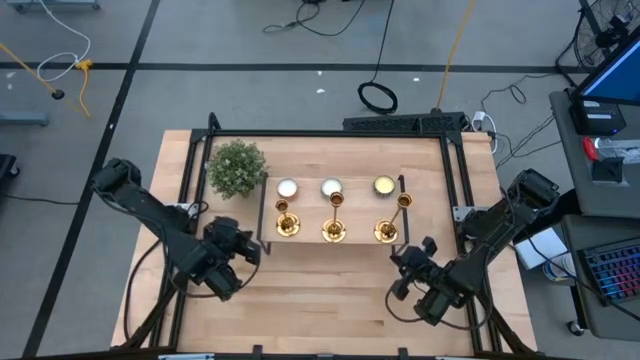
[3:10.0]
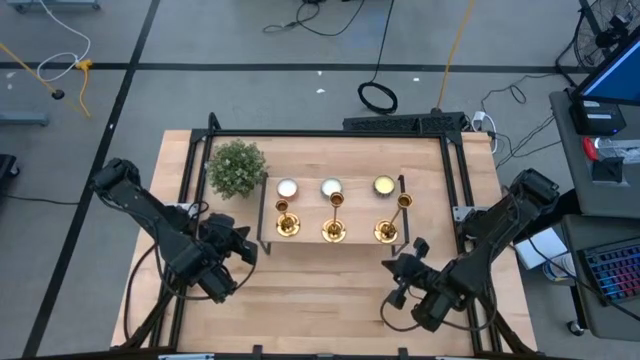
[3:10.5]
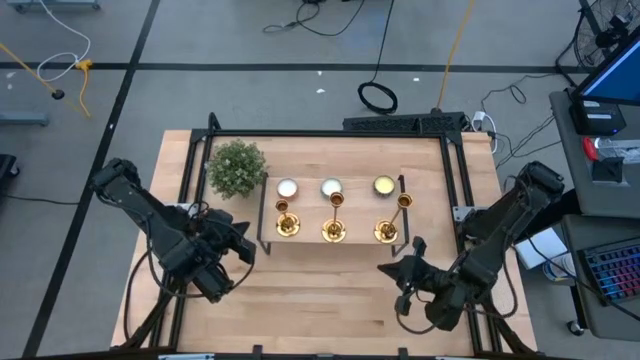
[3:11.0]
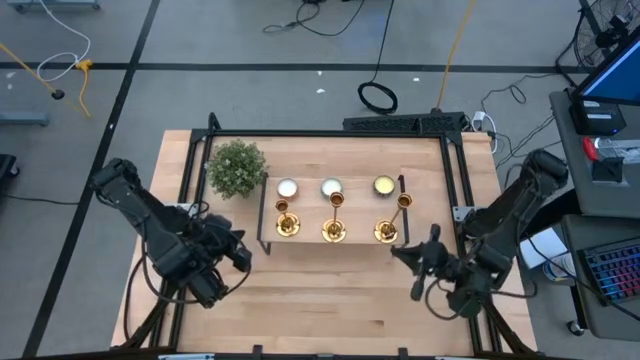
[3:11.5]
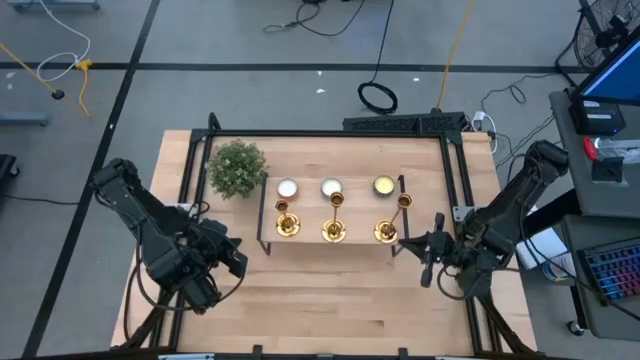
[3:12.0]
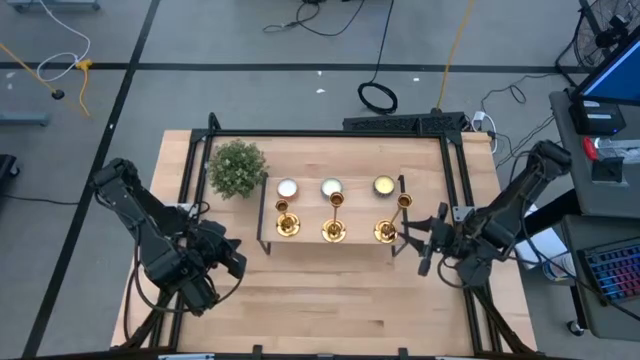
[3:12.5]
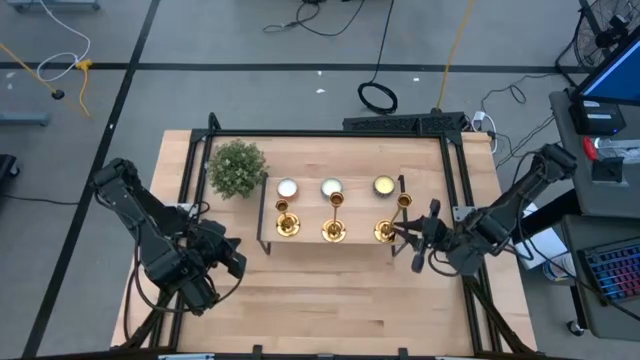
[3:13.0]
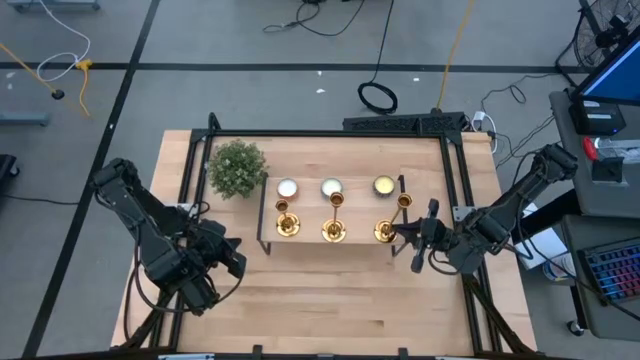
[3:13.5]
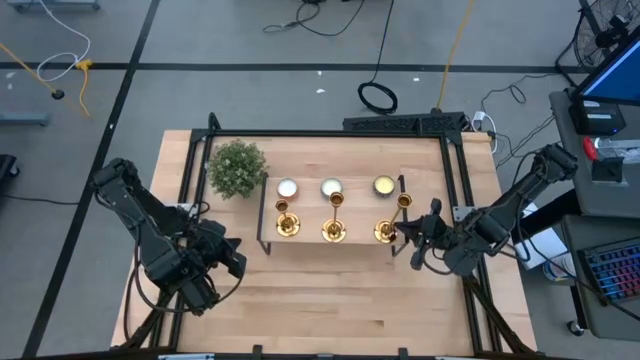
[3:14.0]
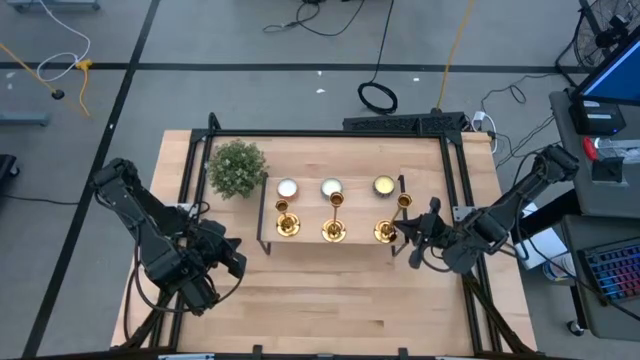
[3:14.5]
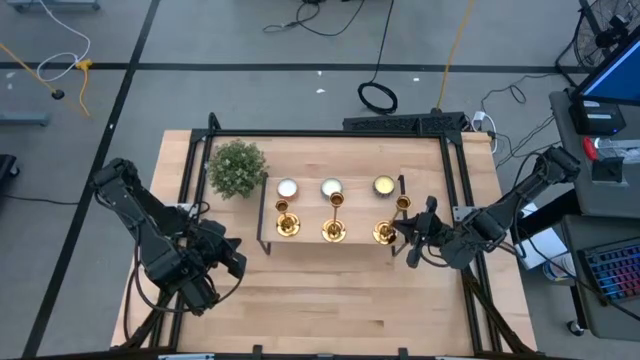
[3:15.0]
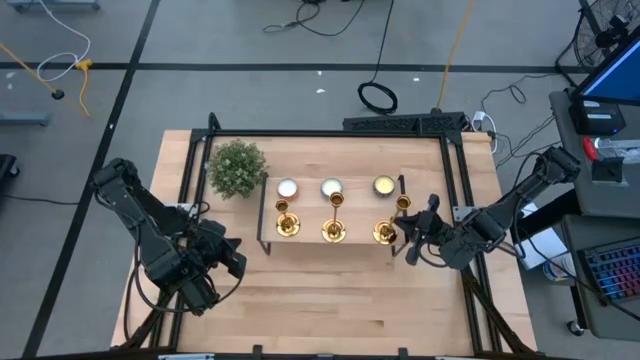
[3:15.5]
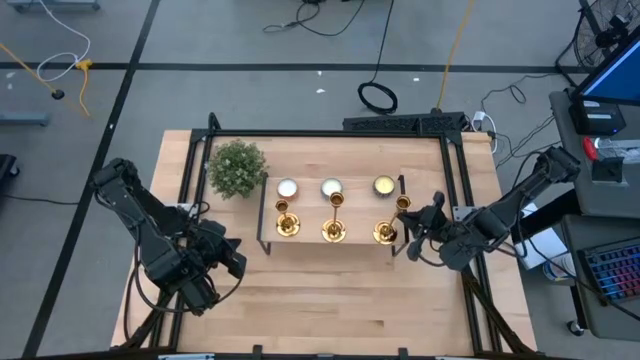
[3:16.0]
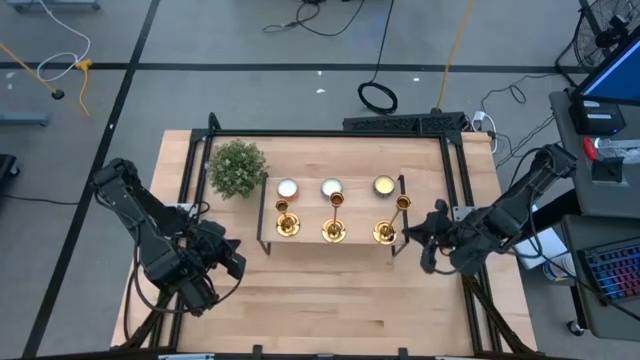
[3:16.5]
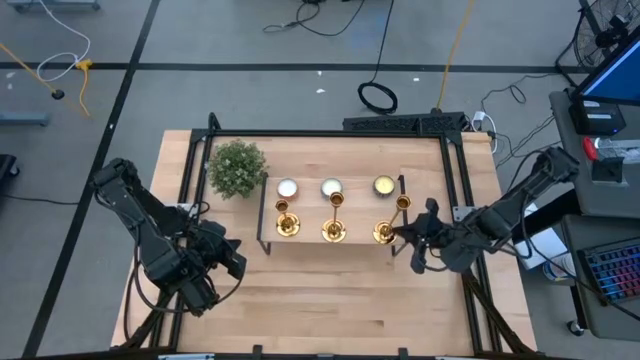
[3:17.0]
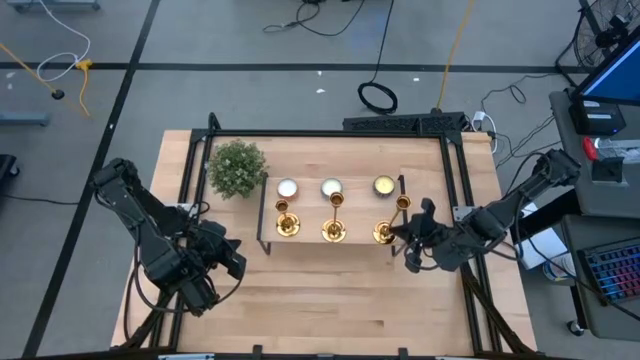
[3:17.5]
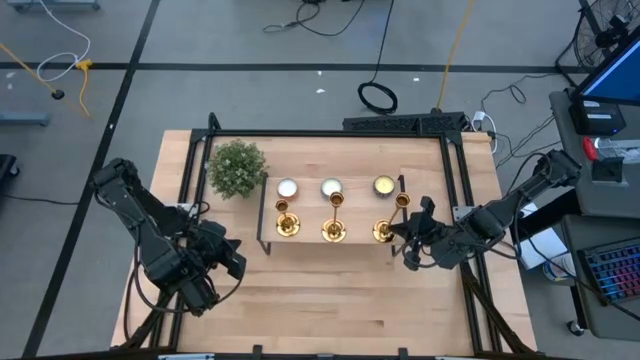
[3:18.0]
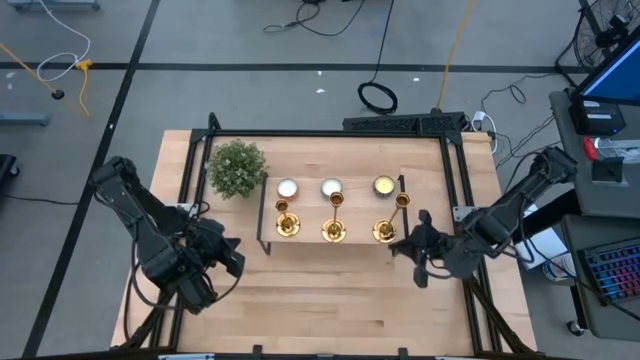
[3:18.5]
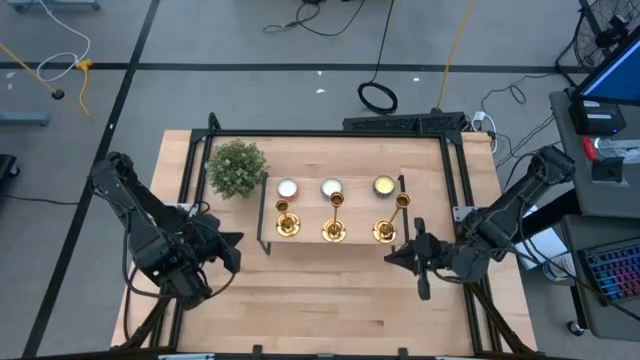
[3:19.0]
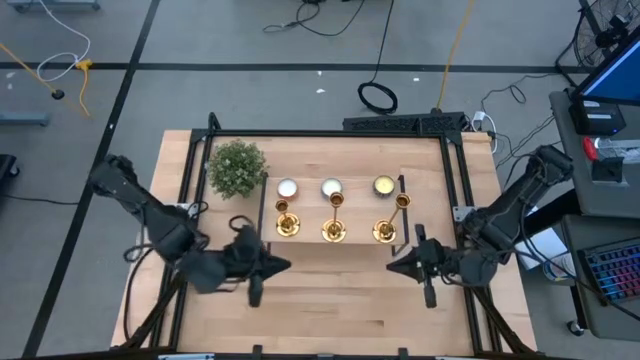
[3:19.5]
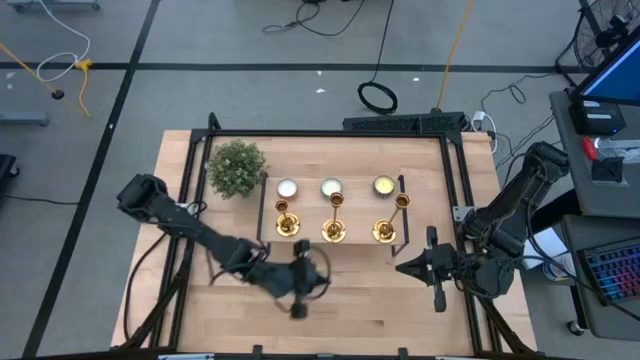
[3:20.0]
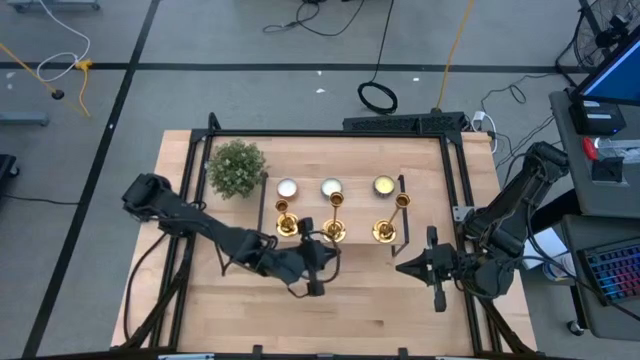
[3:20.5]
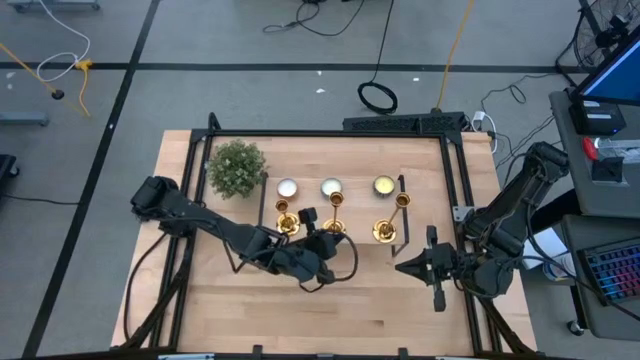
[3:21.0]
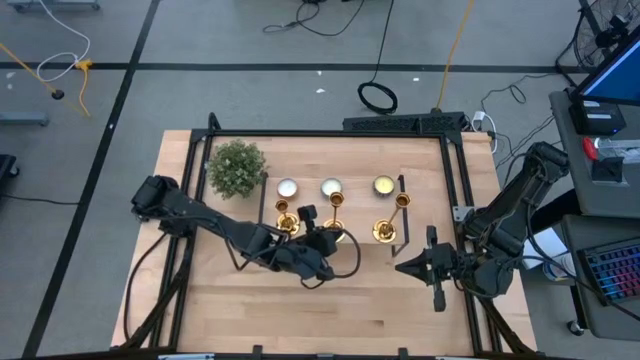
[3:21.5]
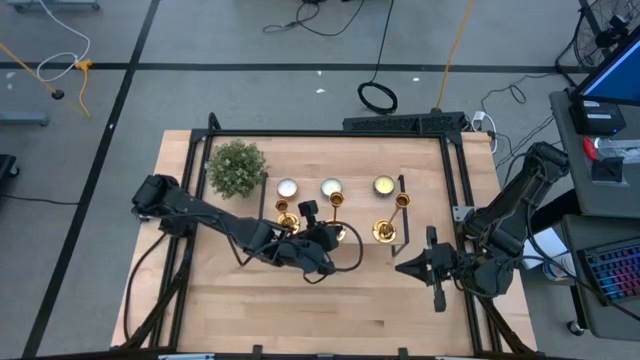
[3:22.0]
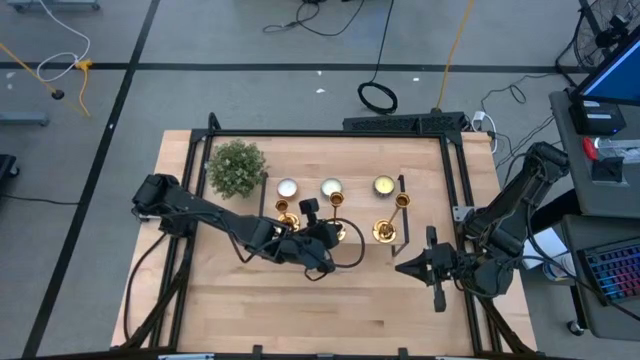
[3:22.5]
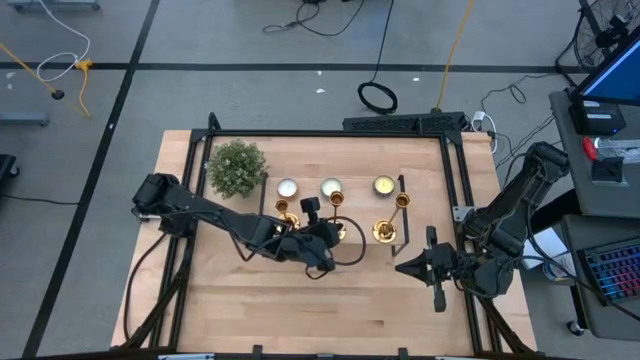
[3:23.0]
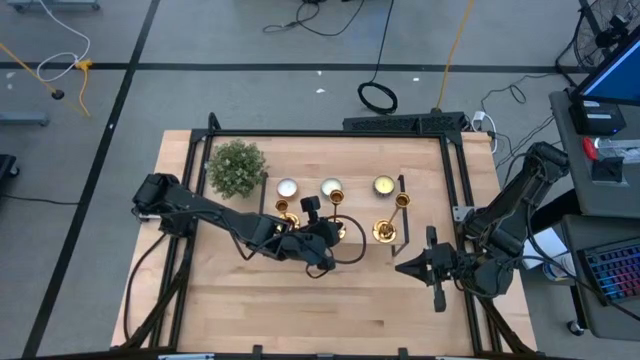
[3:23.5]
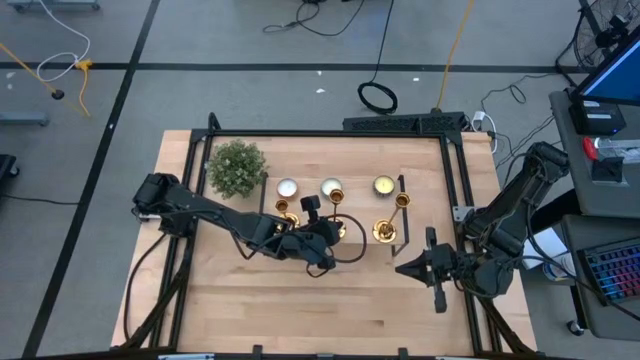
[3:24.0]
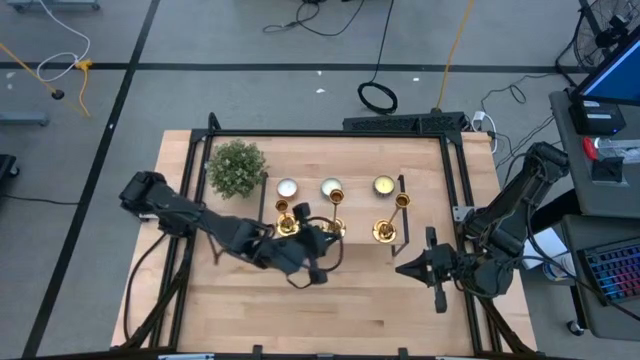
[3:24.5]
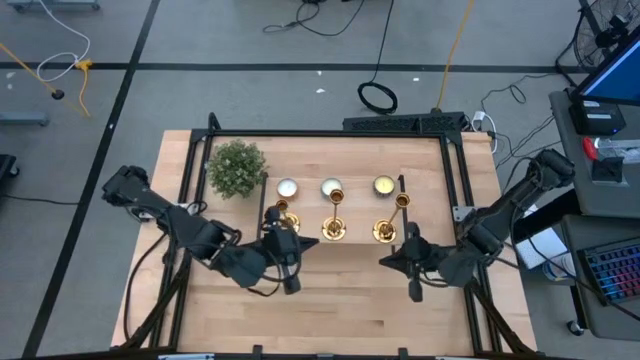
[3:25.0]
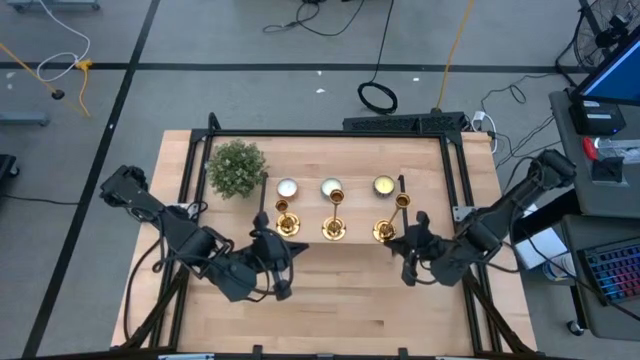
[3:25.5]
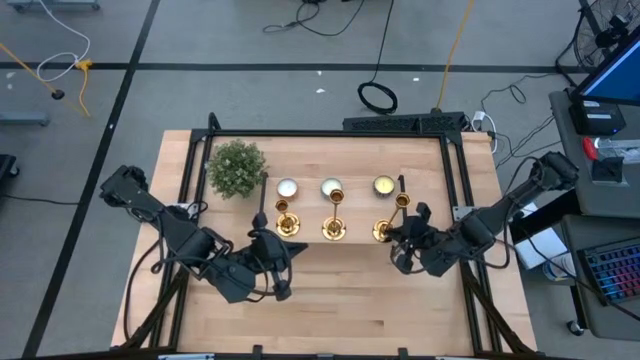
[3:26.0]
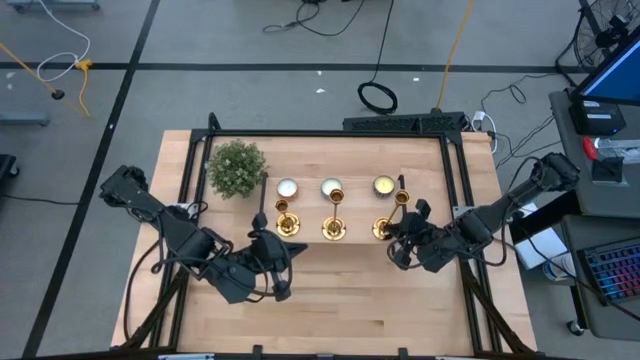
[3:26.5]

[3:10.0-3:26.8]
Task: Pick & Place candle stick holders
Adjust the candle holders on the shelf
